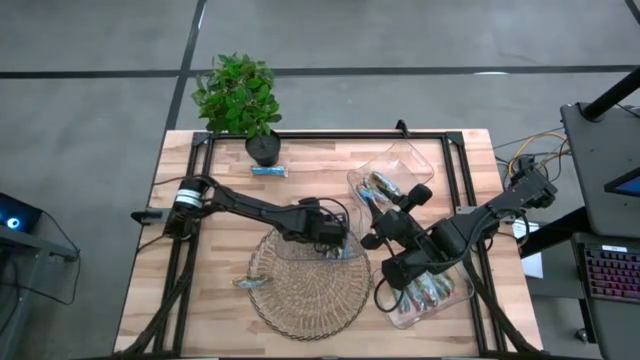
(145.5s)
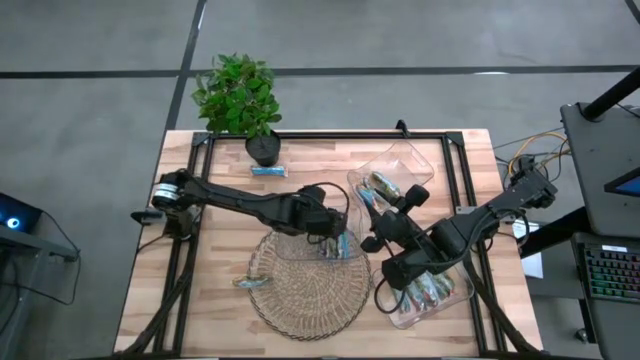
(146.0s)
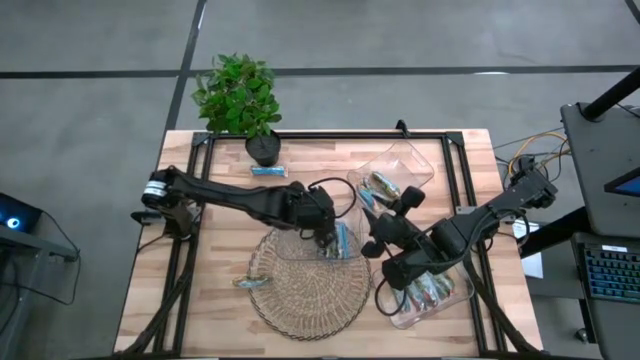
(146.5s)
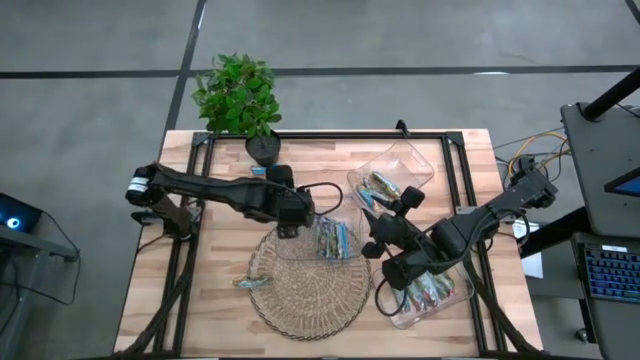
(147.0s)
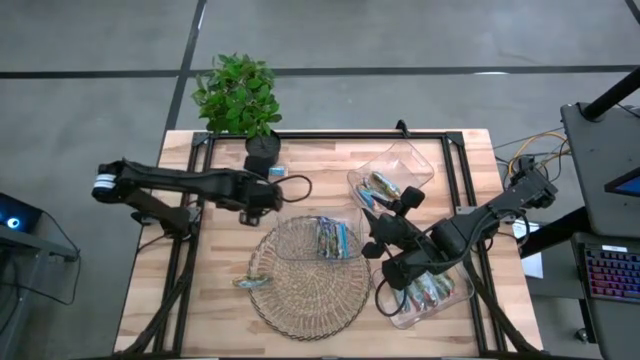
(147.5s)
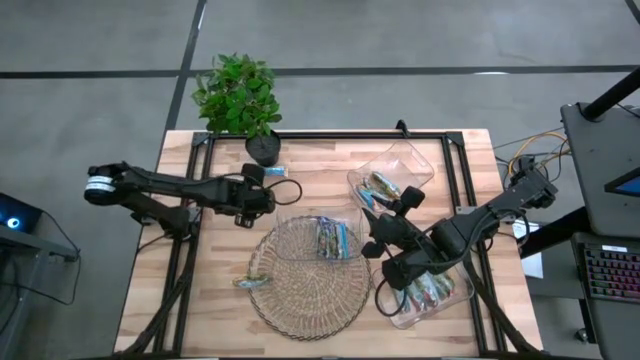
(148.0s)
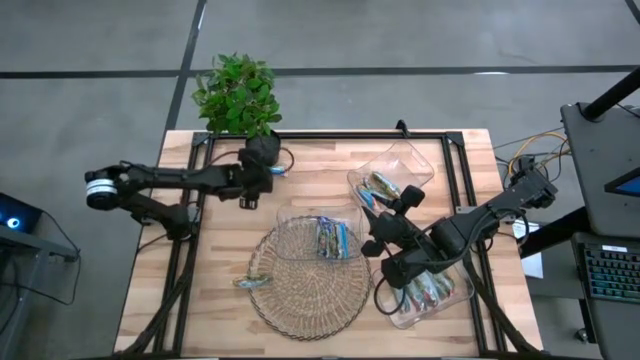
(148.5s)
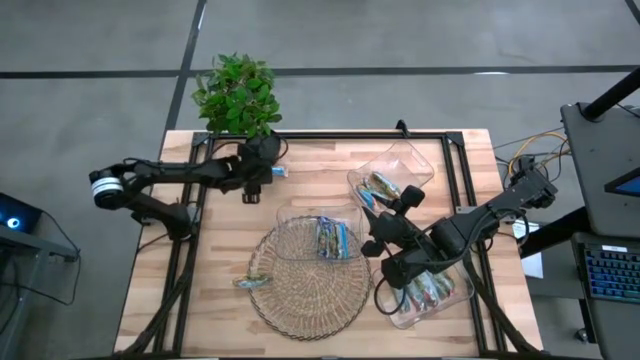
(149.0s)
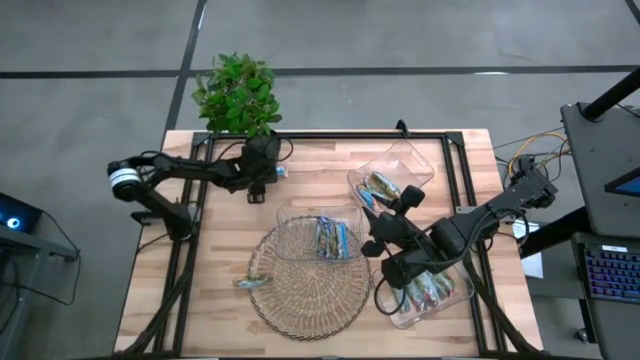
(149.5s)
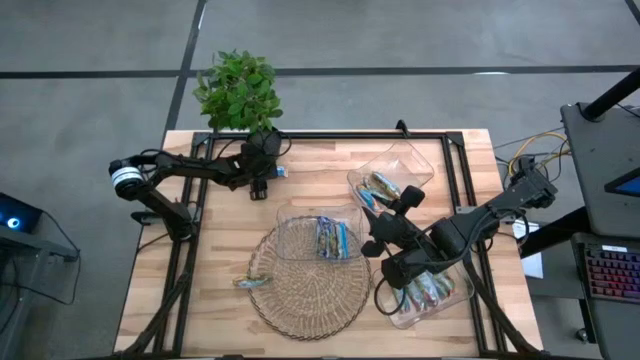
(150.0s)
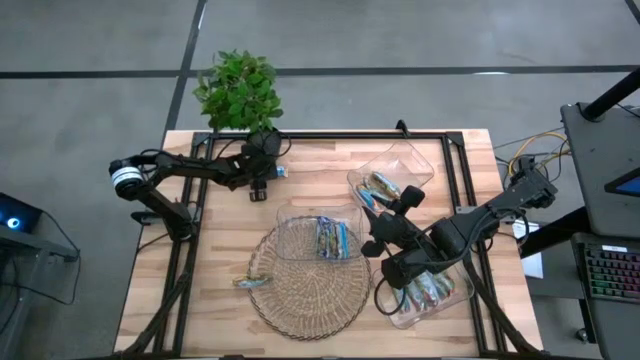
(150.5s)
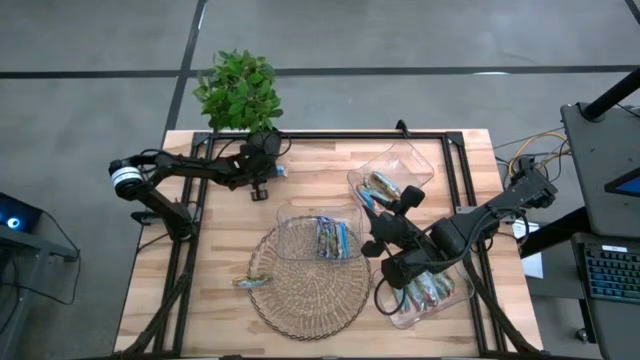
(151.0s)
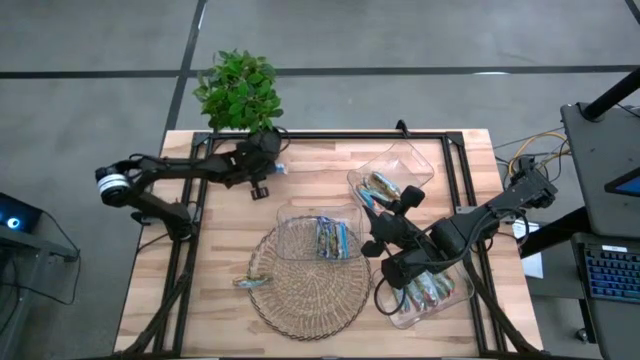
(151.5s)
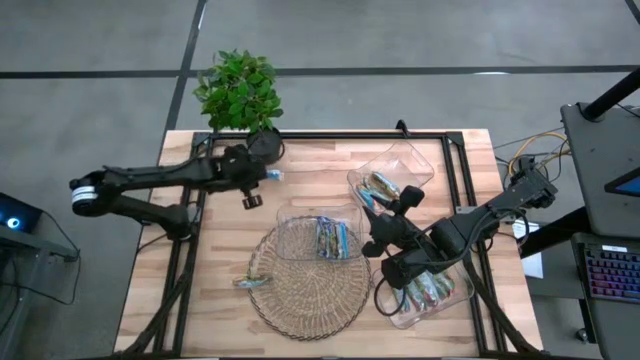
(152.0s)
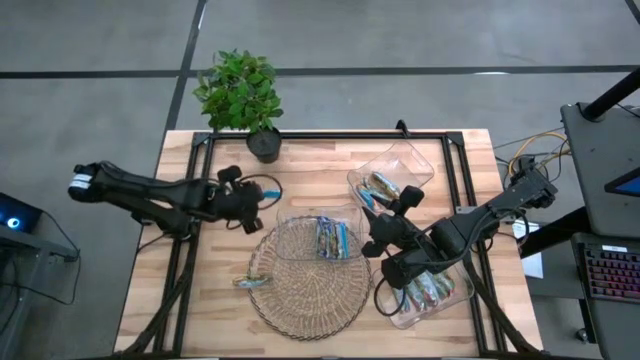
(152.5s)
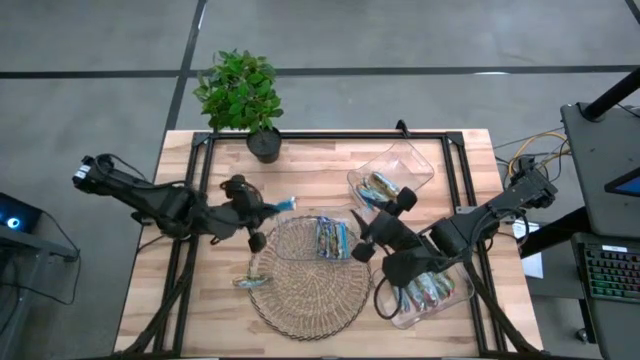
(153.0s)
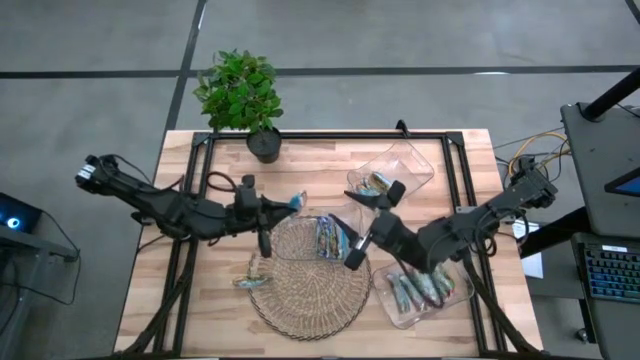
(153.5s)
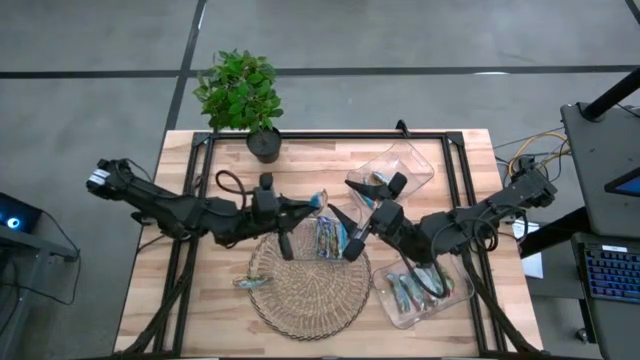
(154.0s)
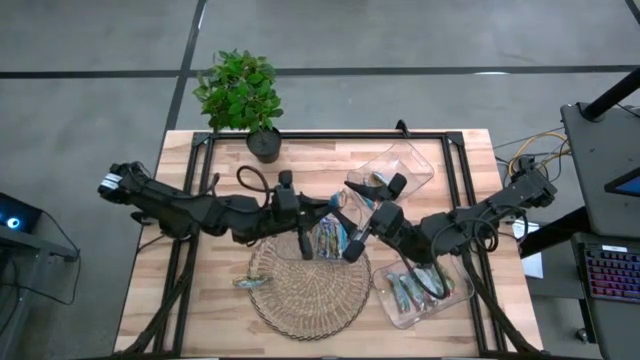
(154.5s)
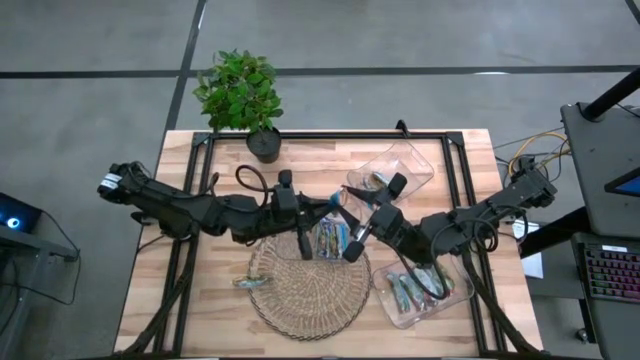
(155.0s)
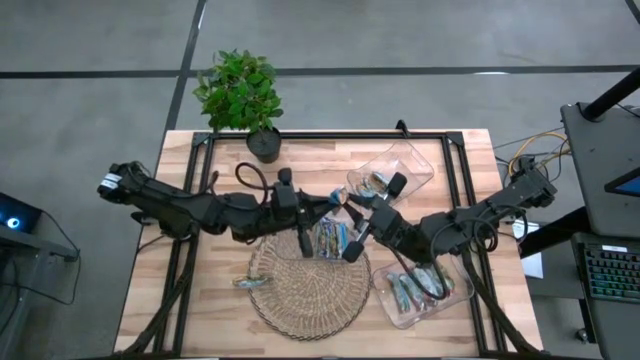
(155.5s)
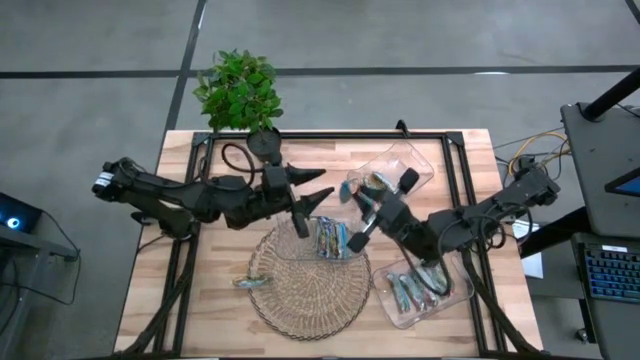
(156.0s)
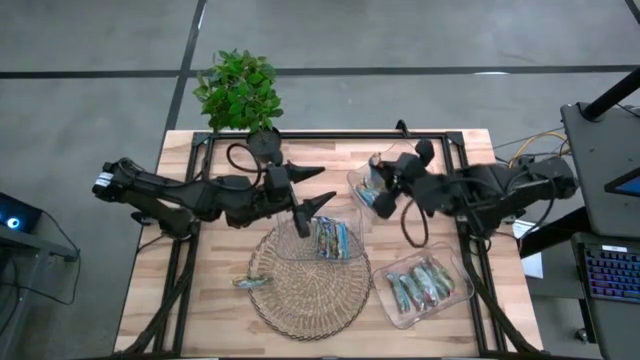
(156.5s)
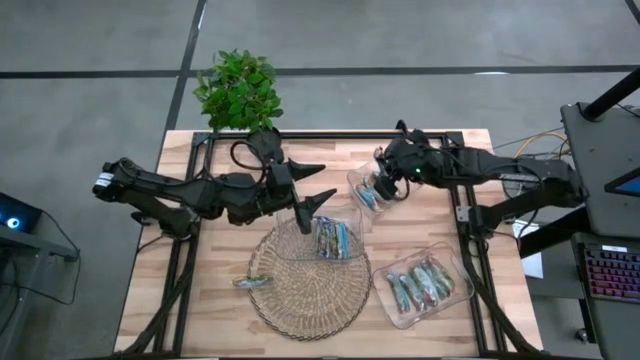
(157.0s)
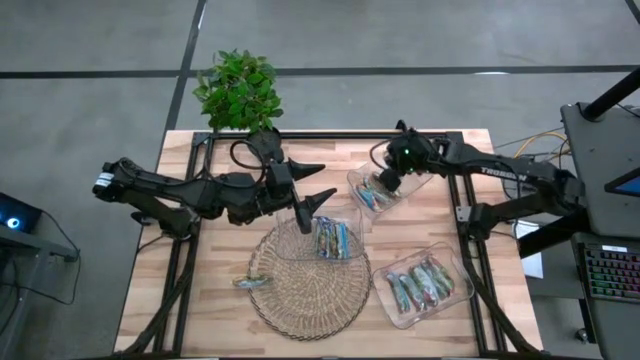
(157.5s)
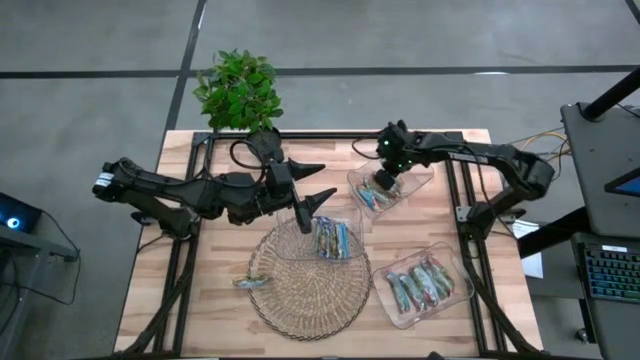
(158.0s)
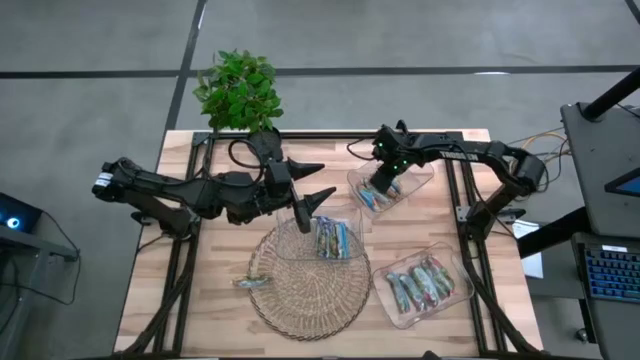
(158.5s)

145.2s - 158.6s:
Task: Pick and place Granola Bars by type
Put the yellow granola bar into the top transparent bin

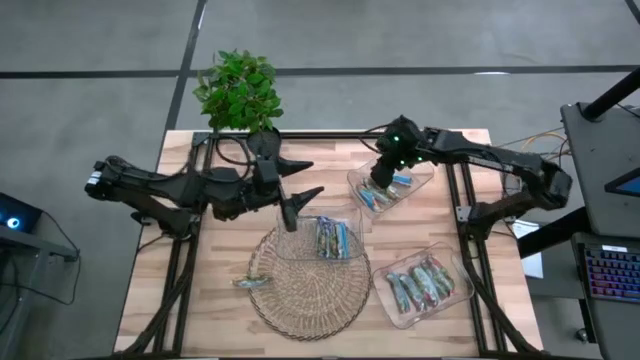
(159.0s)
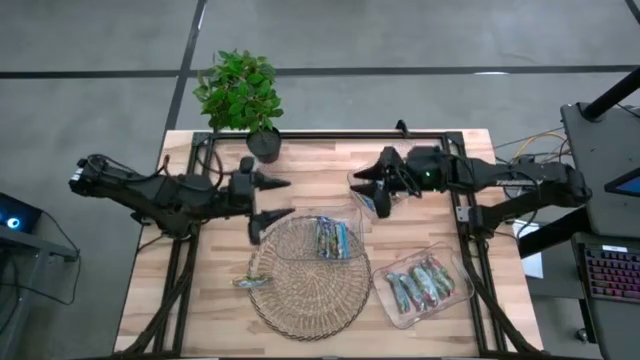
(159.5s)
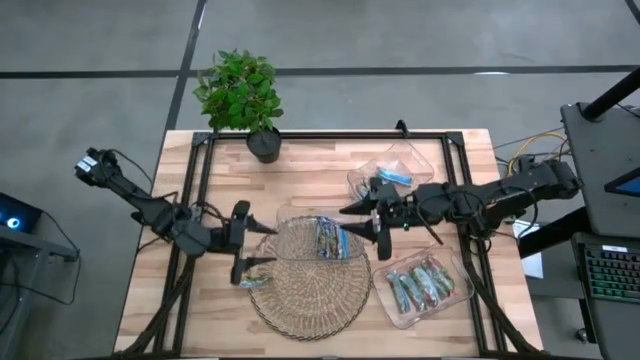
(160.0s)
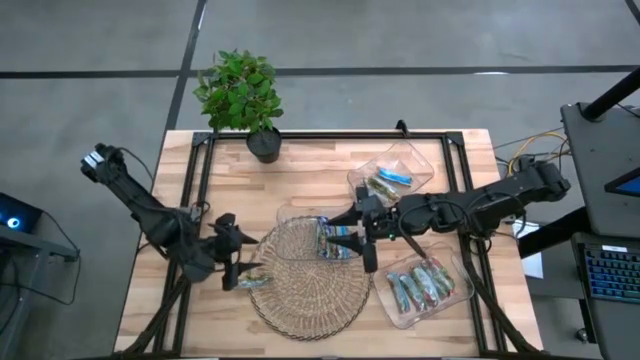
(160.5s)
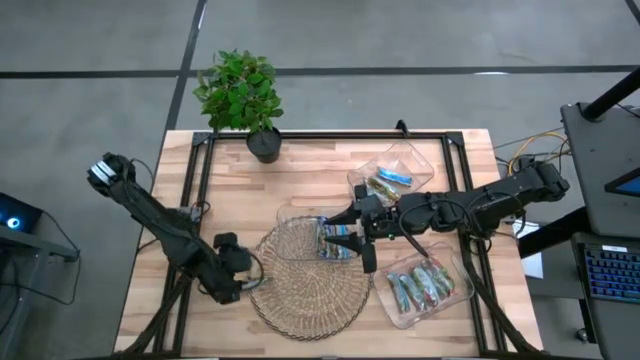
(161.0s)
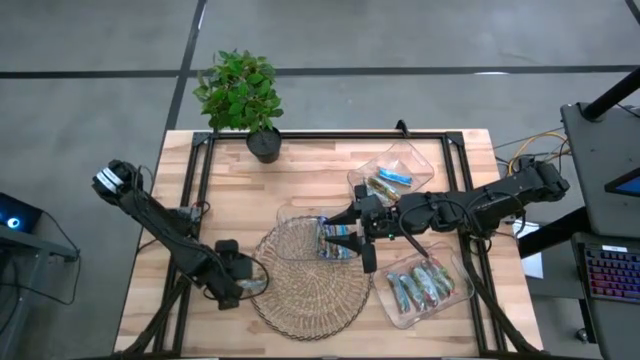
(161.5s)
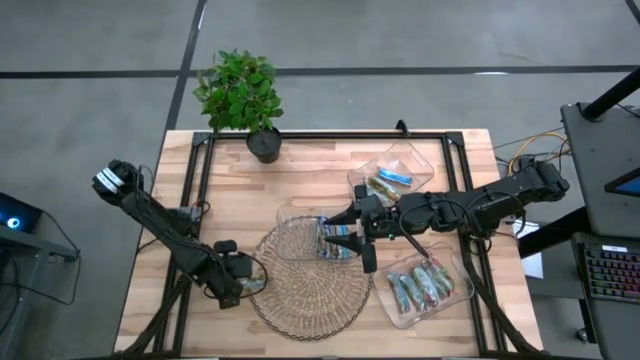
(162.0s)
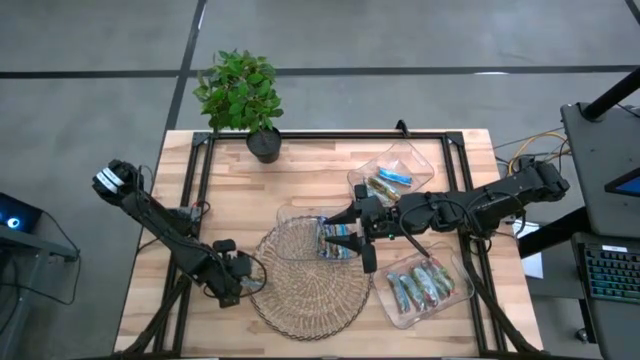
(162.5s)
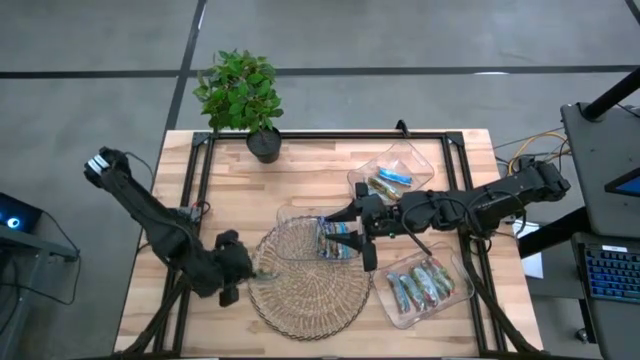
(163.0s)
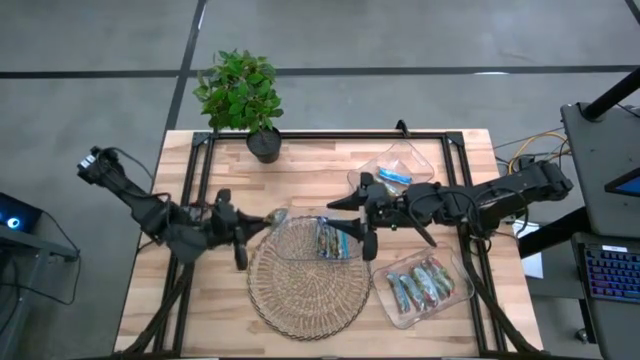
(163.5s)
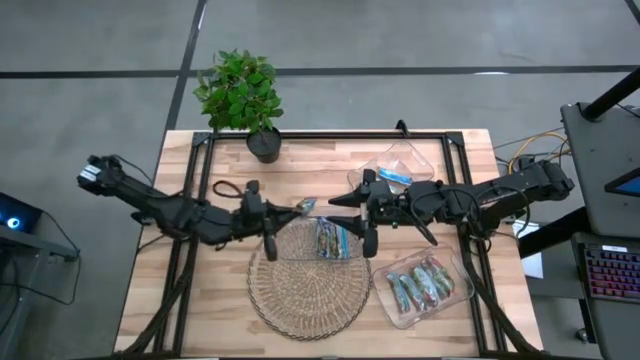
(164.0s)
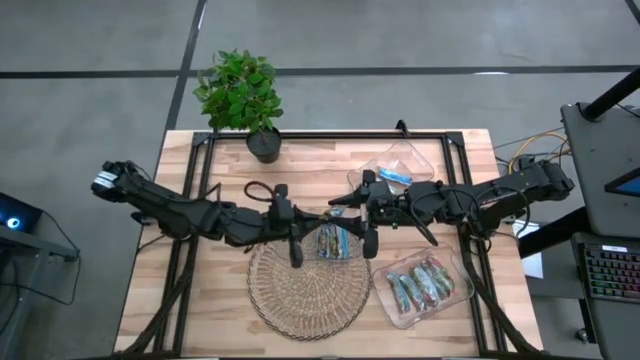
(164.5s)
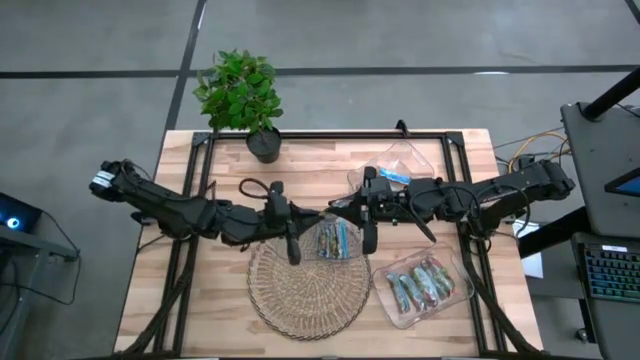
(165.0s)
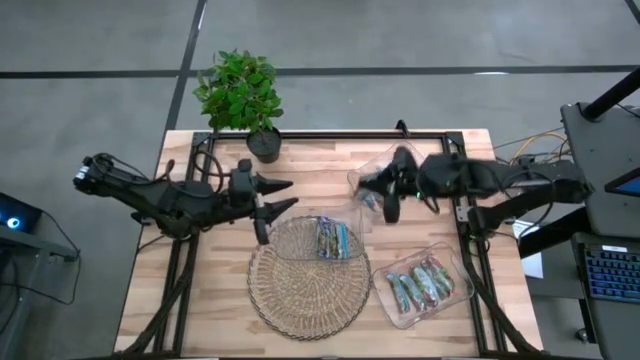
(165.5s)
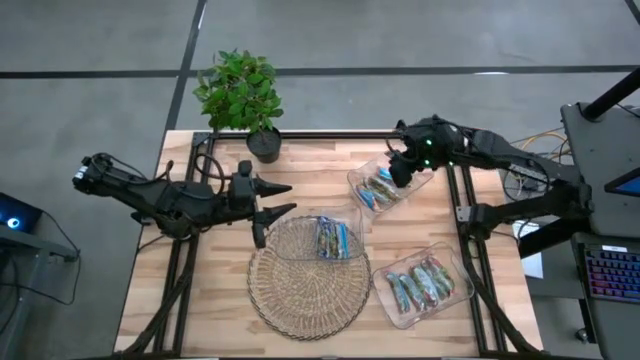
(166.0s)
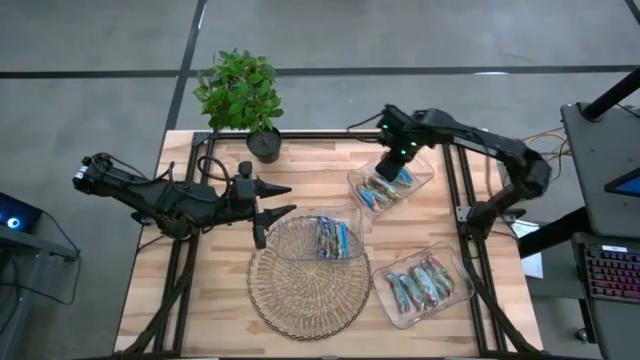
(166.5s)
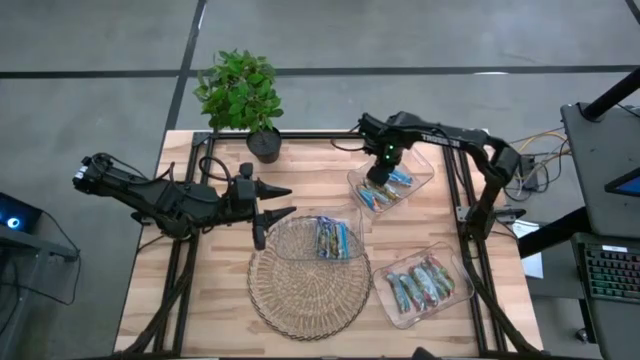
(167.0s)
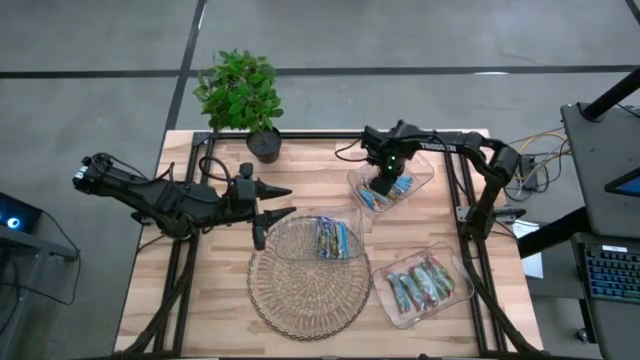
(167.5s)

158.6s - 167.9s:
Put the yellow granola bar into the top transparent bin
